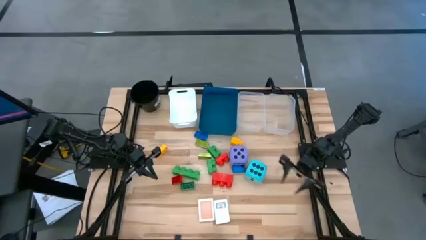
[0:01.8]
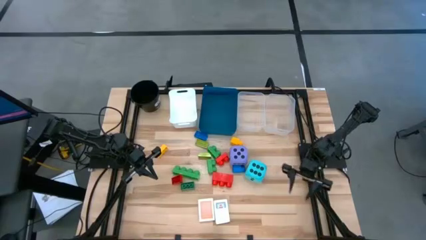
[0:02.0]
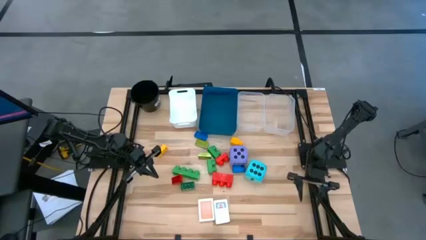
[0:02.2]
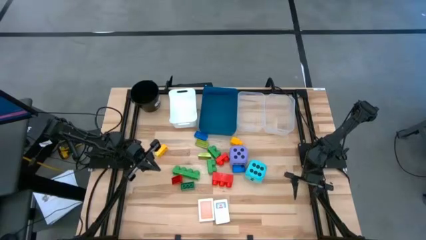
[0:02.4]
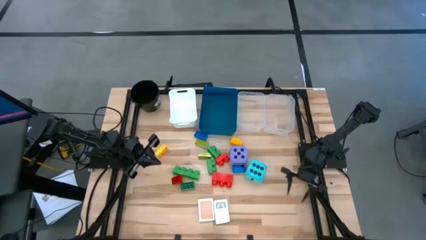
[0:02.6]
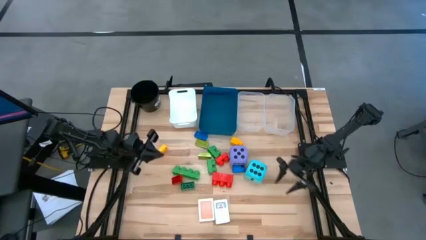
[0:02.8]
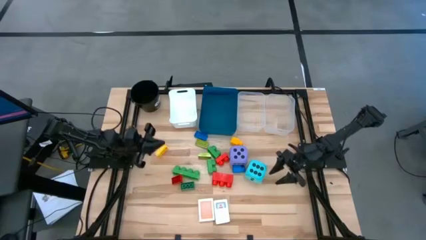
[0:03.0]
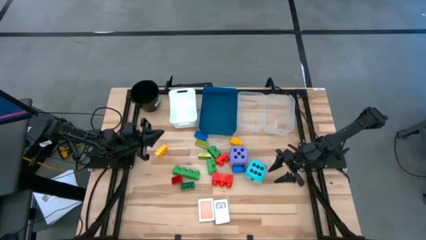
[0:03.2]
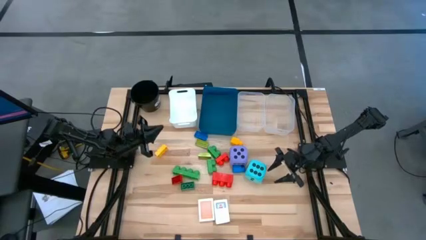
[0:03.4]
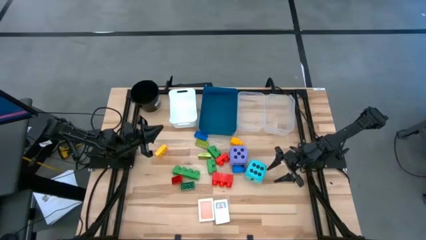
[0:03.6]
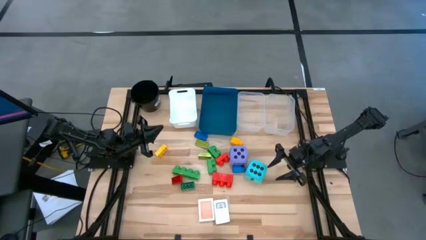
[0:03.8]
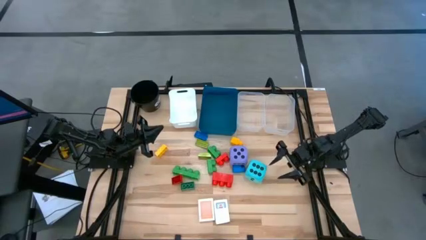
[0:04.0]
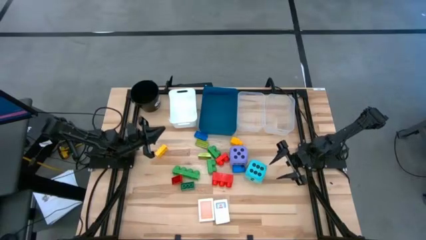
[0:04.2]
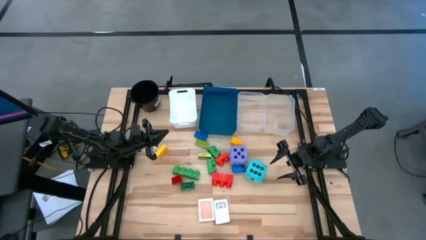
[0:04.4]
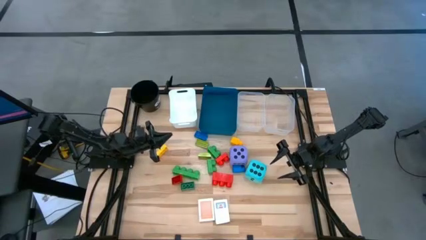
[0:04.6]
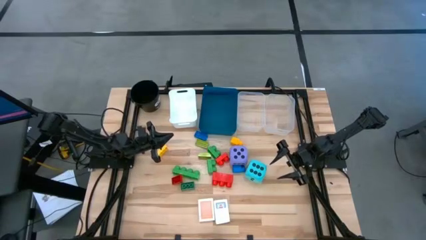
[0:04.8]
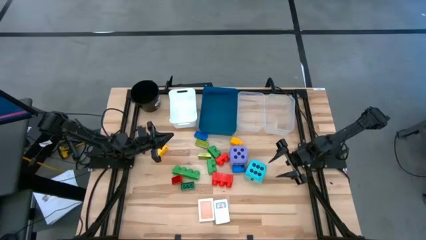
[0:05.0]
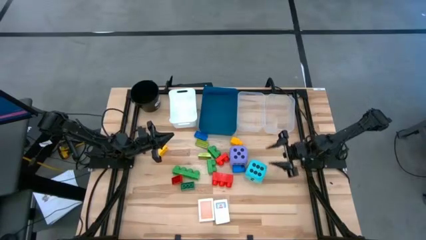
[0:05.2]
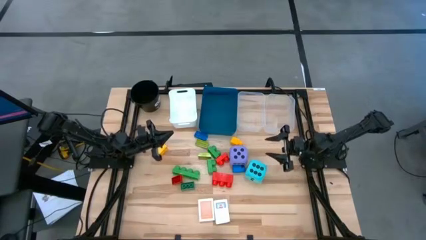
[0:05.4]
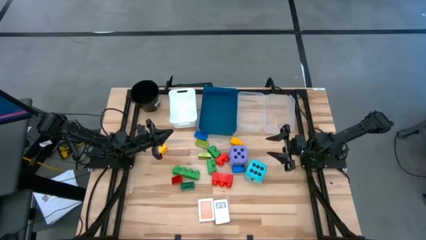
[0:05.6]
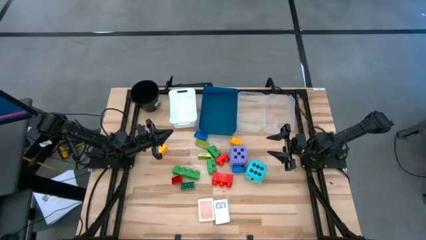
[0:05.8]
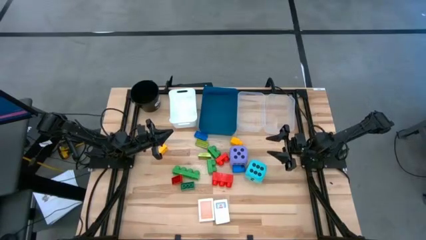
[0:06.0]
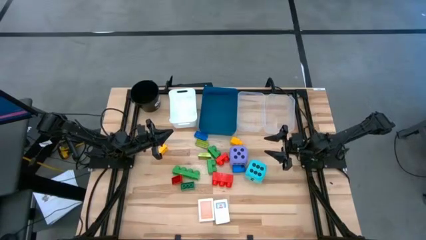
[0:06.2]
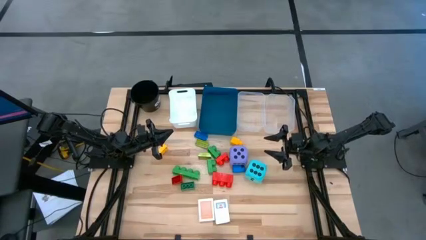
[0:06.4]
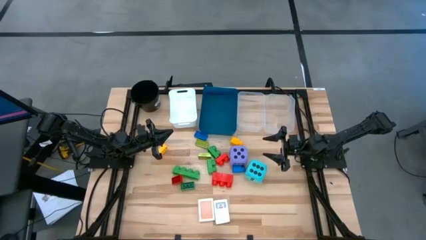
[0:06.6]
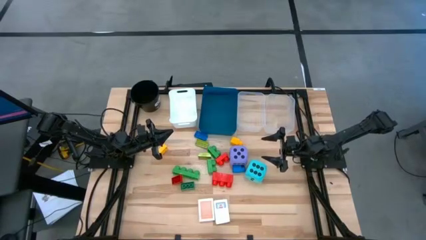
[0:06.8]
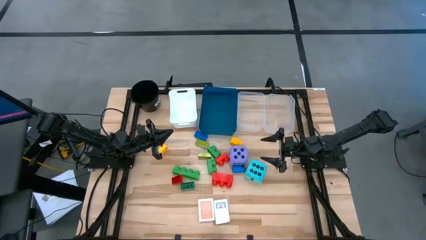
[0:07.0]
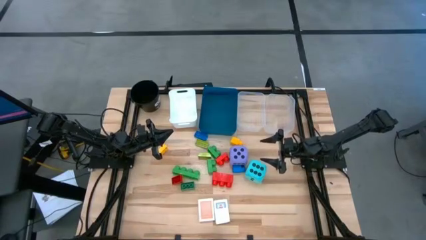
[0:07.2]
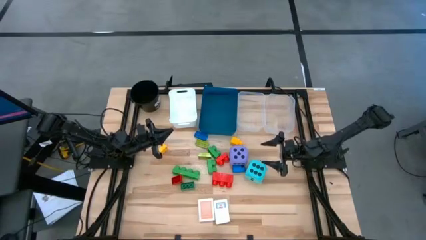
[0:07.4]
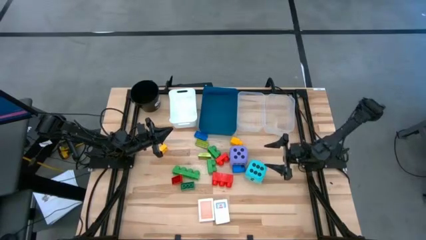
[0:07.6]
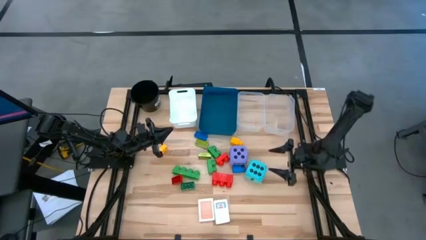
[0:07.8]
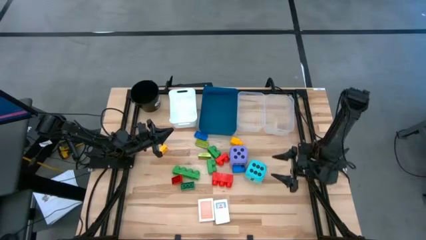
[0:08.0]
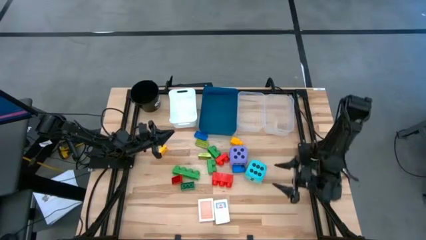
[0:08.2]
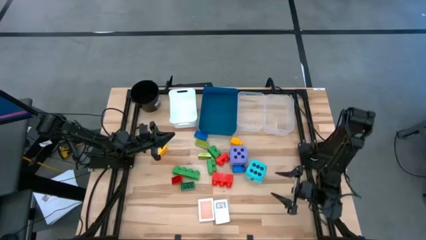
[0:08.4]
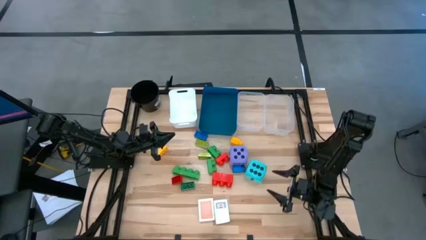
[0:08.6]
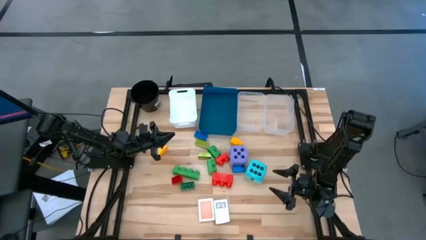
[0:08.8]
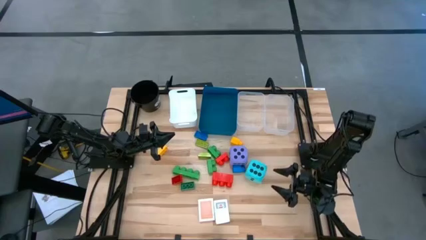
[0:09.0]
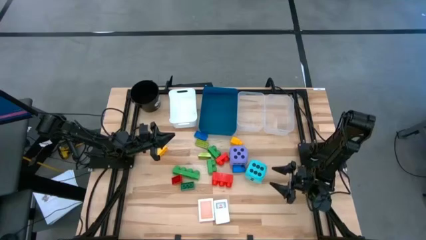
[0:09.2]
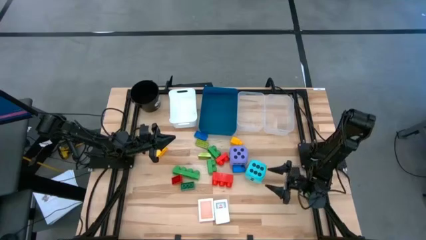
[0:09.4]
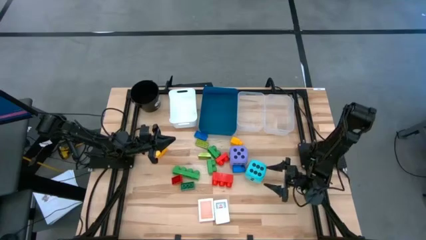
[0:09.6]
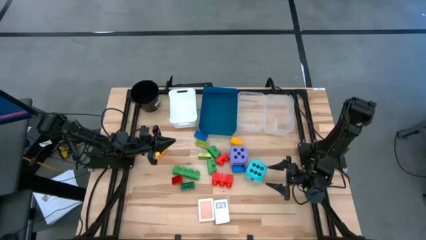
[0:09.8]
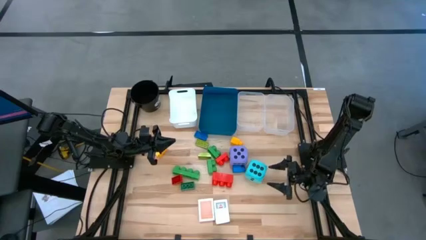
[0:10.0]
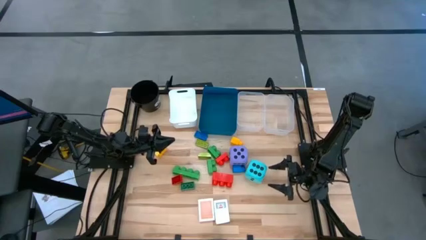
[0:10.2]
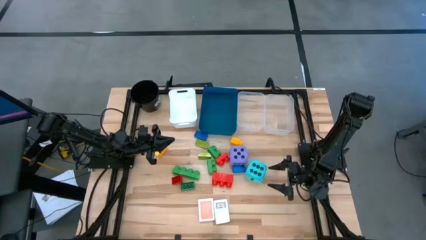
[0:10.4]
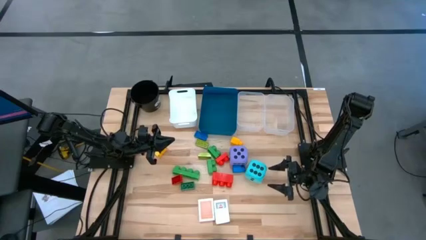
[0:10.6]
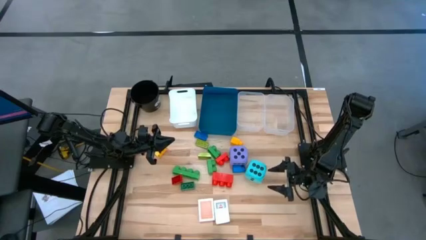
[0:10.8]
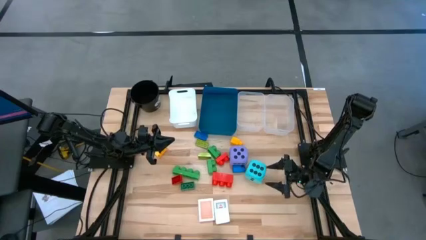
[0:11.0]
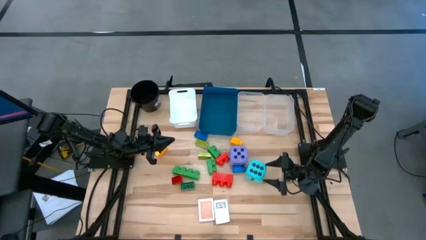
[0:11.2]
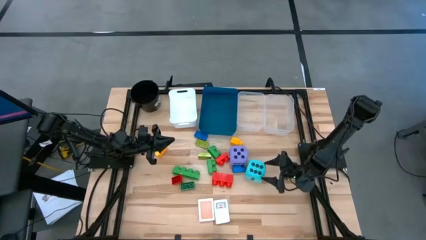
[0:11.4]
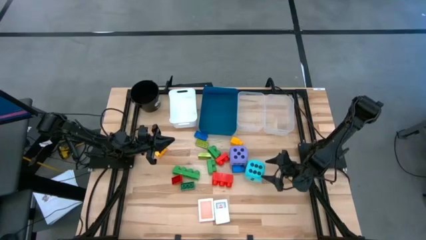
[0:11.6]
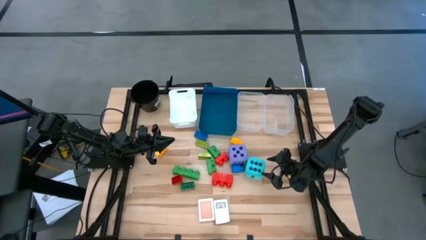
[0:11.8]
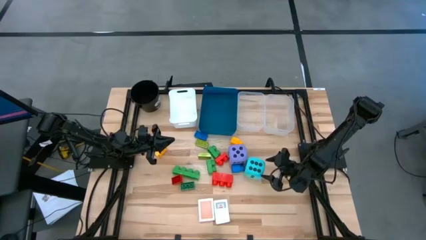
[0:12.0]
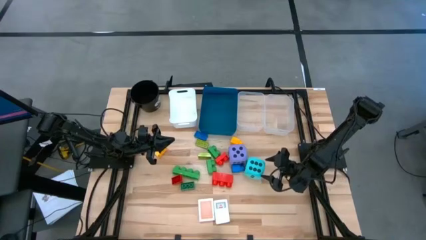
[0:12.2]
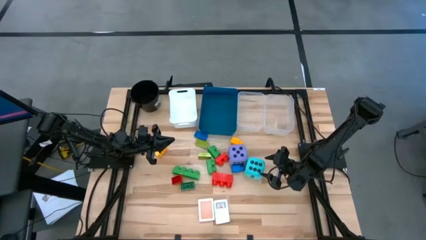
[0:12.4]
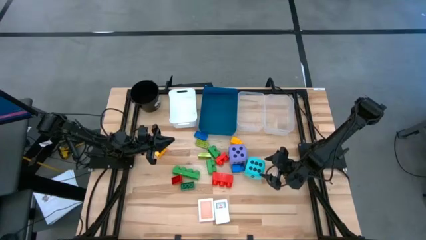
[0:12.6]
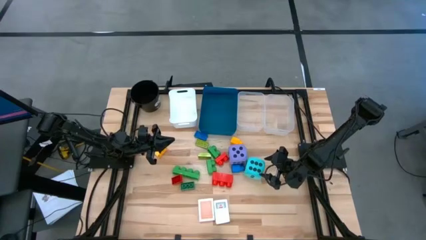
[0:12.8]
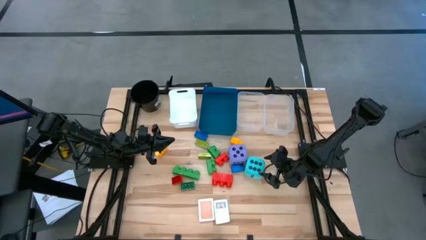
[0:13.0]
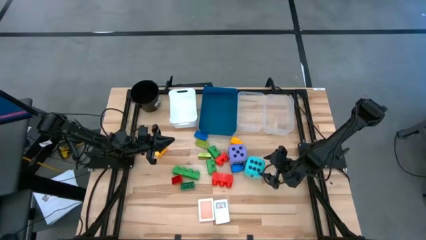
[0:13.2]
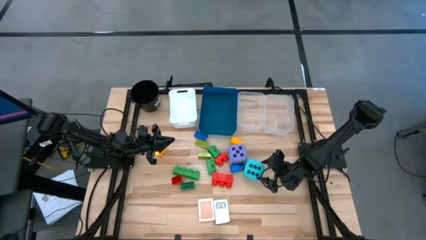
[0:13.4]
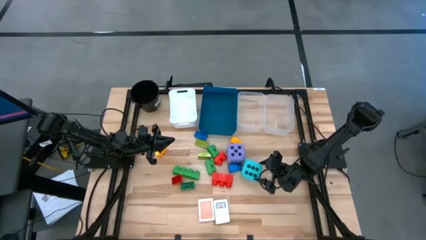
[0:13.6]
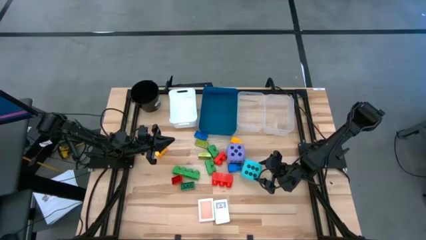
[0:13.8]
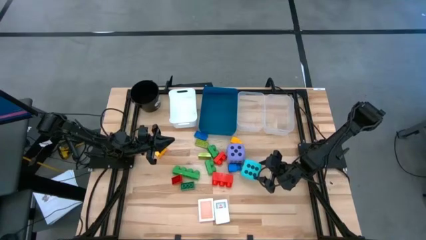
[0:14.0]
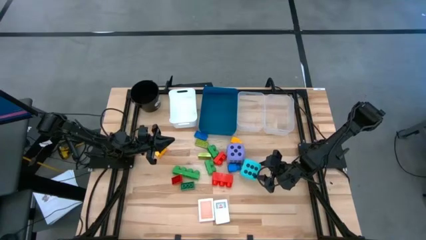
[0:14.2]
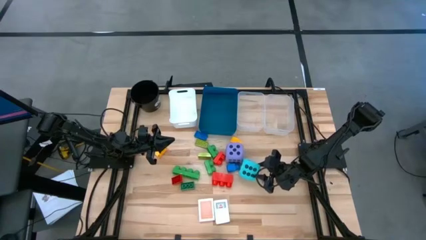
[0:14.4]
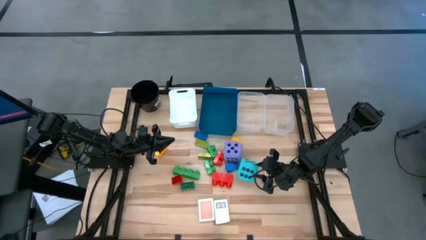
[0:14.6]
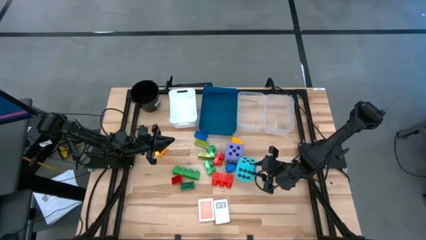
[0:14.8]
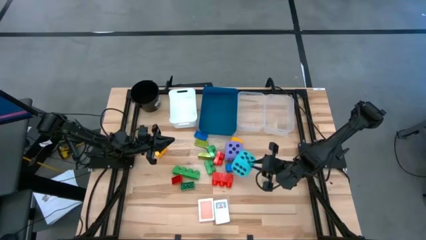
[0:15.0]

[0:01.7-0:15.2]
Task: Pick & Place Toys
Put the blue dice into the blue bin
